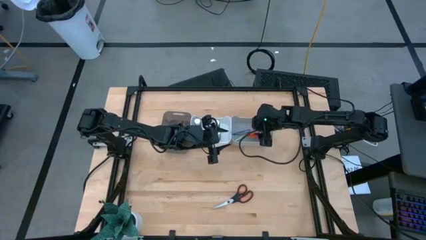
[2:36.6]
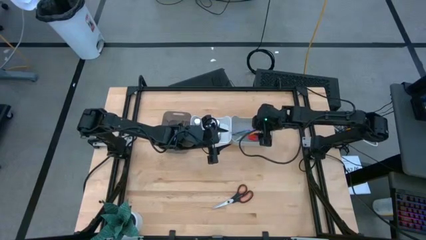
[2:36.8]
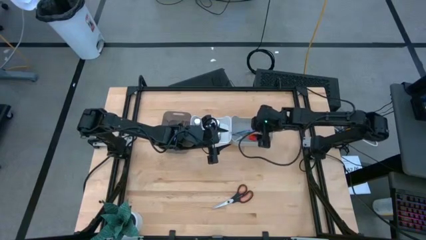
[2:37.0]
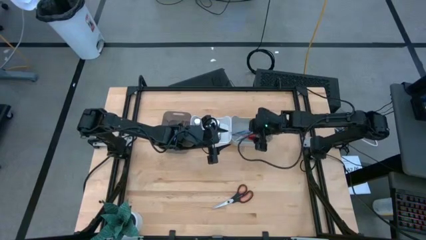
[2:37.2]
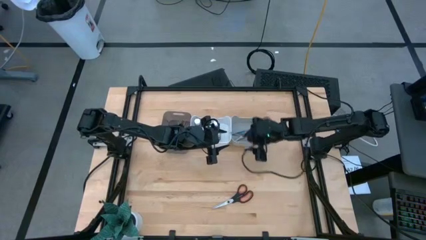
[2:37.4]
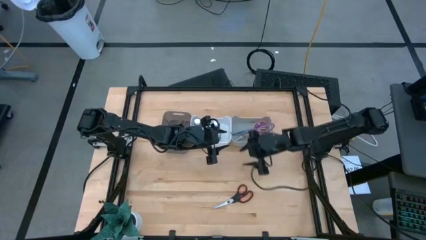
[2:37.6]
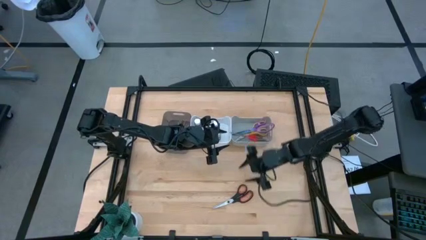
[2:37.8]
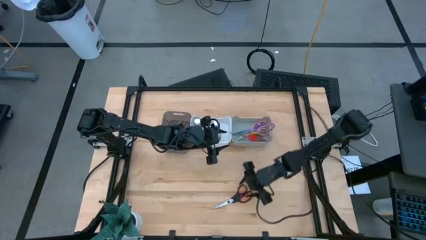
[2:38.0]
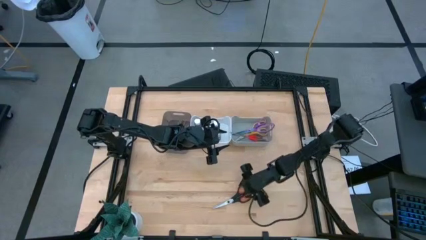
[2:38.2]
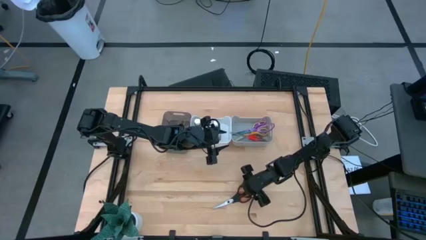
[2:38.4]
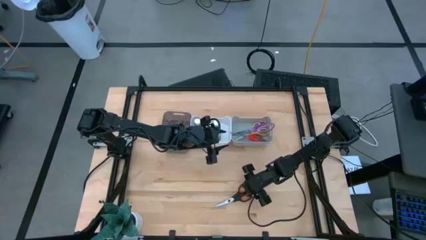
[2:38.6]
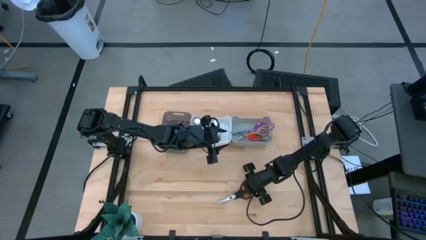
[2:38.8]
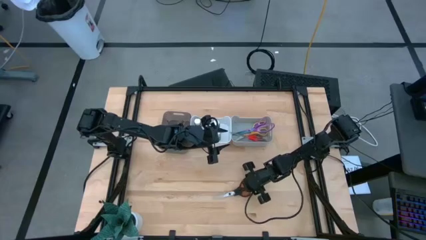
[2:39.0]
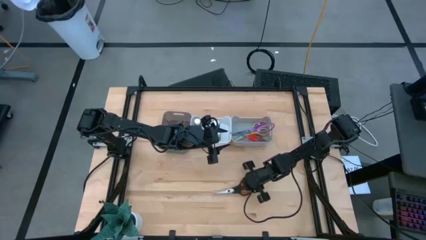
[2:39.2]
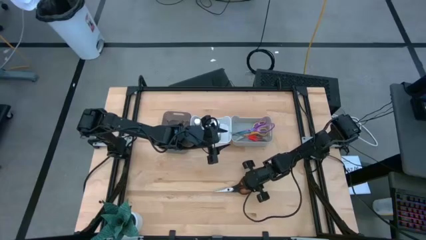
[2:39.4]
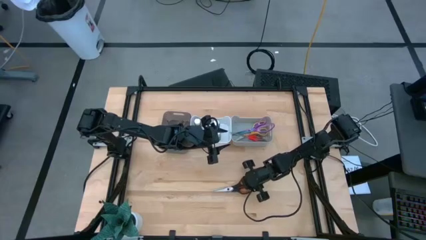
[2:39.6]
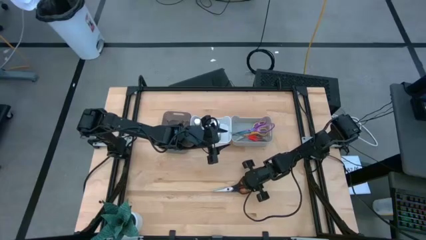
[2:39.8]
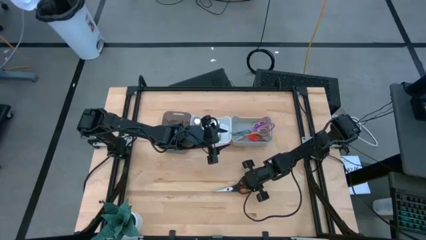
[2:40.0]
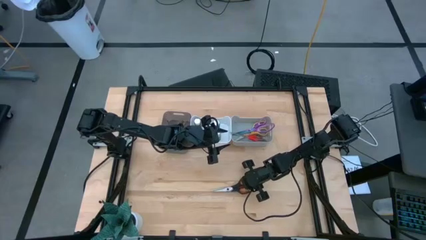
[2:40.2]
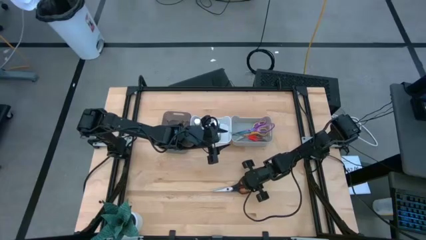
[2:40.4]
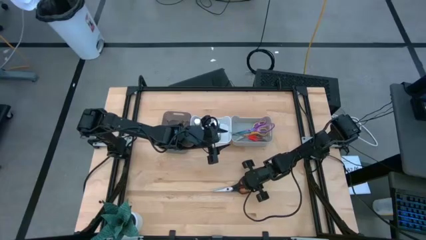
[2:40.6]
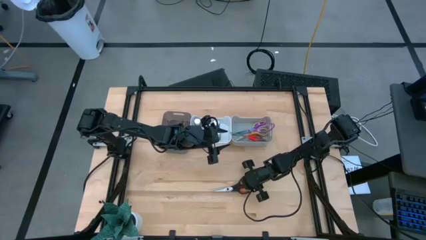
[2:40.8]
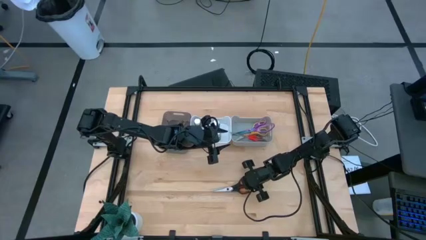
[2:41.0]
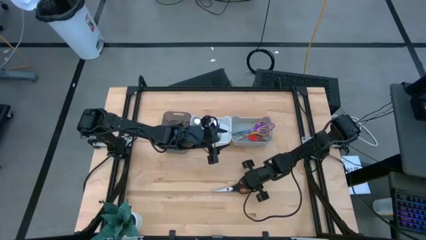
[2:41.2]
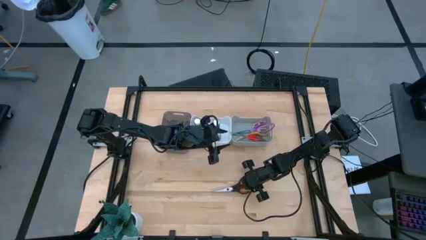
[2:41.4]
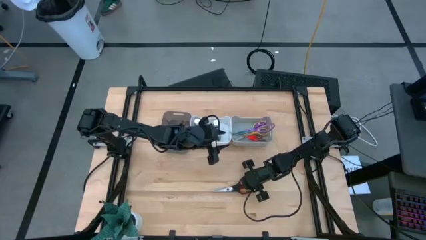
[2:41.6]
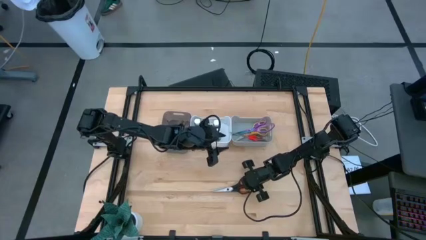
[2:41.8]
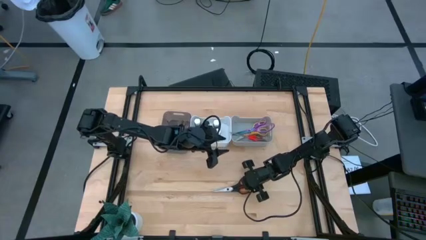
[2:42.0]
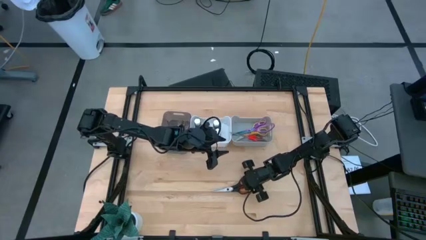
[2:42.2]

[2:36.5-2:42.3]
Task: Pick & Place Paint Supplies
Put the black scissors into the gray bin

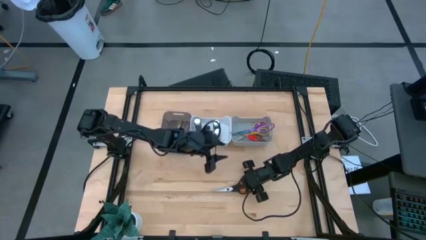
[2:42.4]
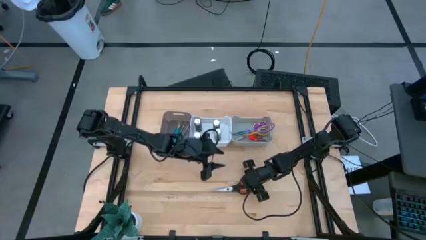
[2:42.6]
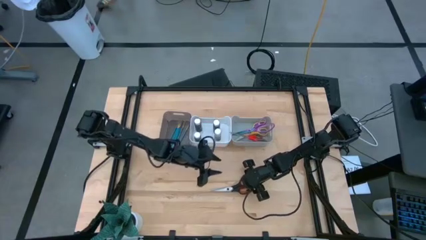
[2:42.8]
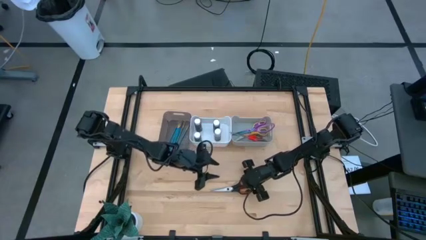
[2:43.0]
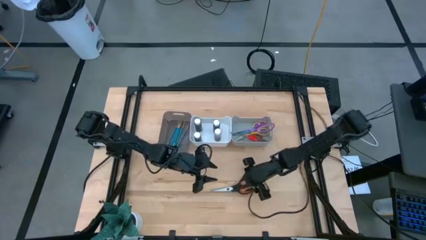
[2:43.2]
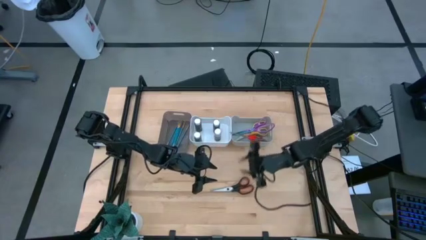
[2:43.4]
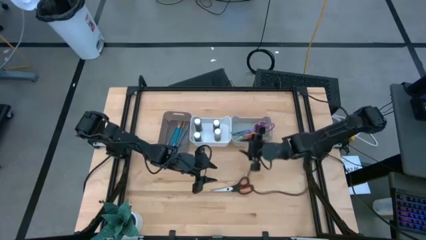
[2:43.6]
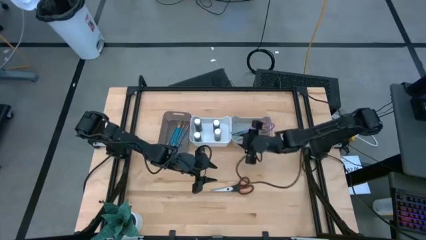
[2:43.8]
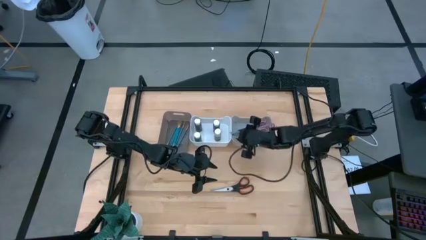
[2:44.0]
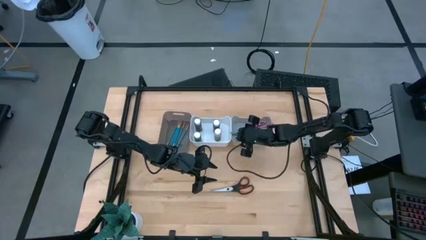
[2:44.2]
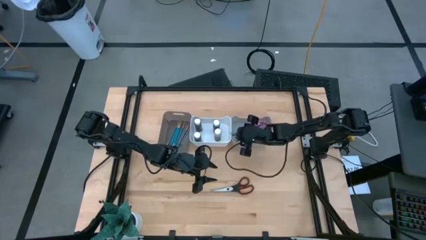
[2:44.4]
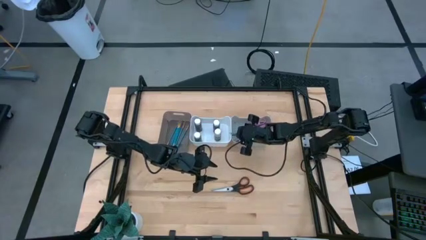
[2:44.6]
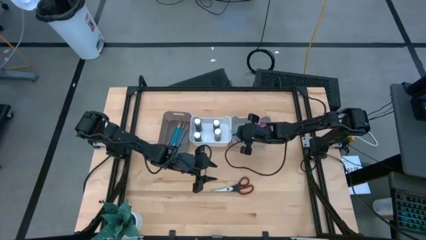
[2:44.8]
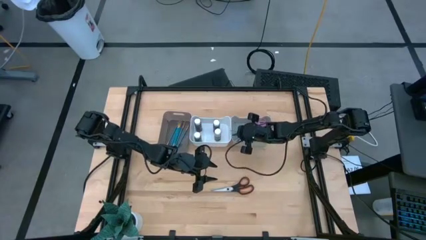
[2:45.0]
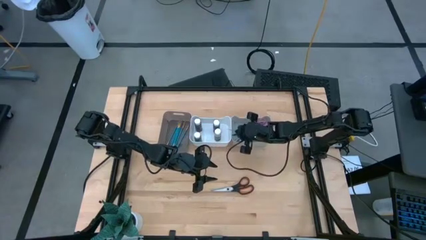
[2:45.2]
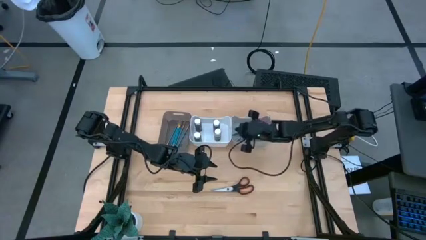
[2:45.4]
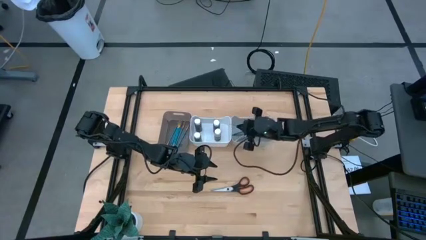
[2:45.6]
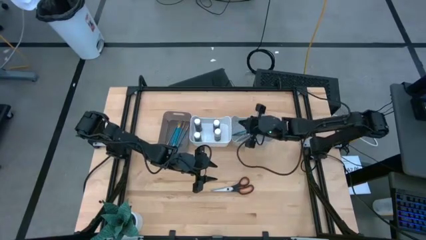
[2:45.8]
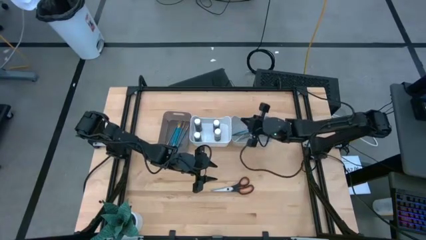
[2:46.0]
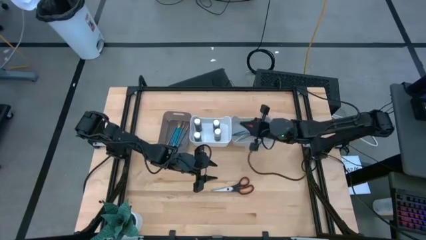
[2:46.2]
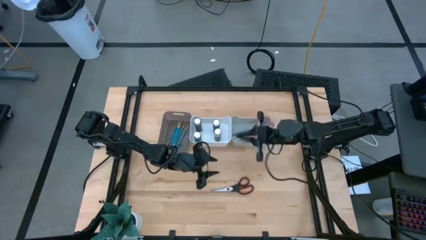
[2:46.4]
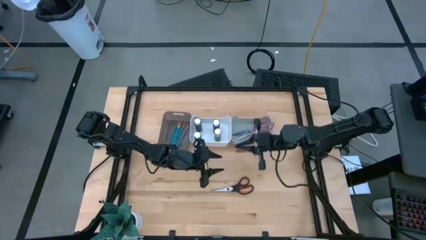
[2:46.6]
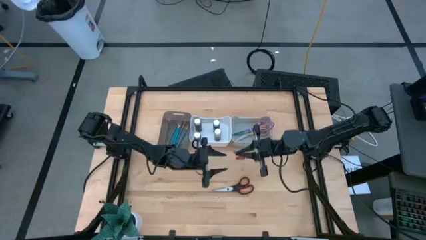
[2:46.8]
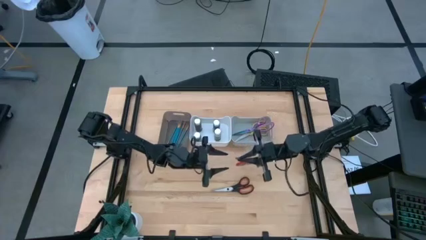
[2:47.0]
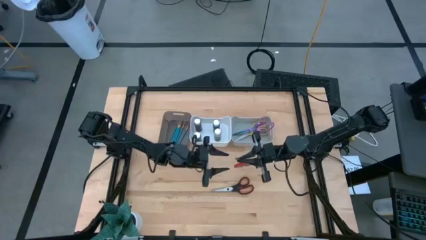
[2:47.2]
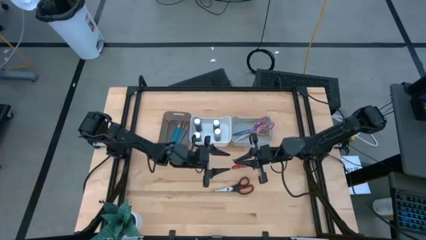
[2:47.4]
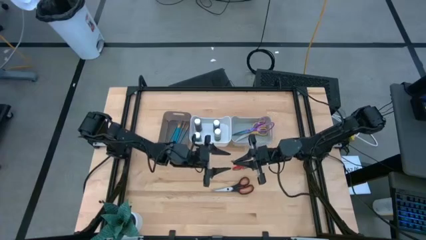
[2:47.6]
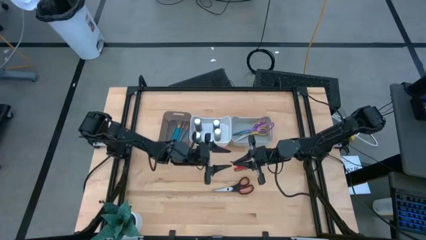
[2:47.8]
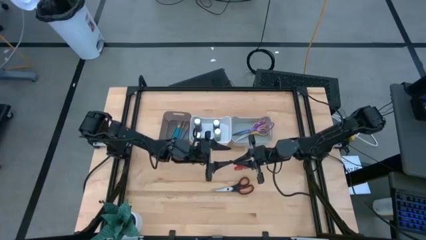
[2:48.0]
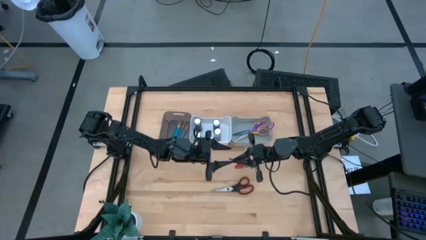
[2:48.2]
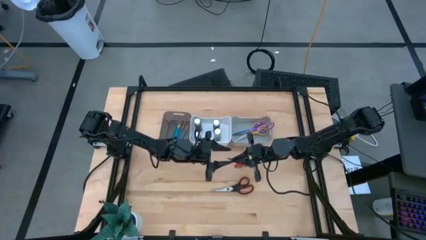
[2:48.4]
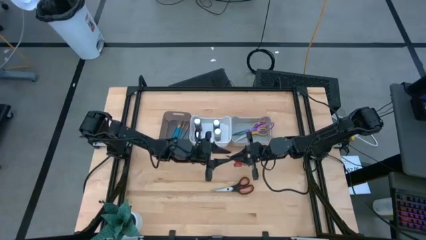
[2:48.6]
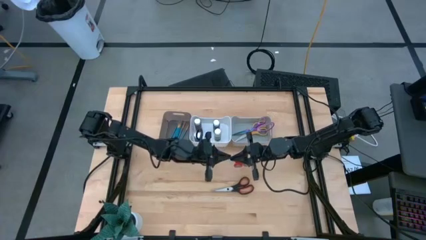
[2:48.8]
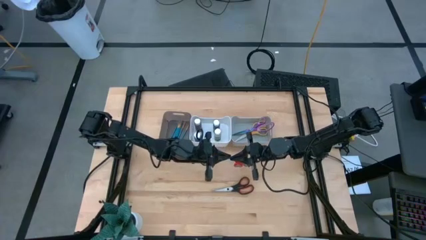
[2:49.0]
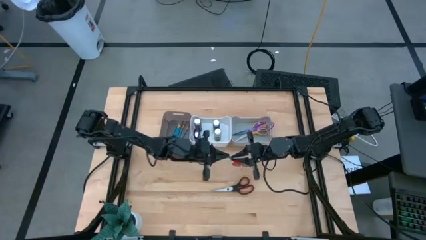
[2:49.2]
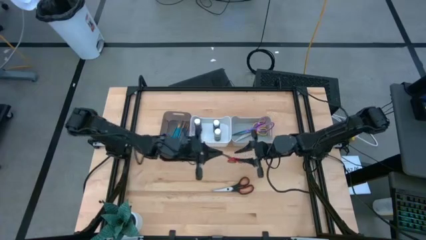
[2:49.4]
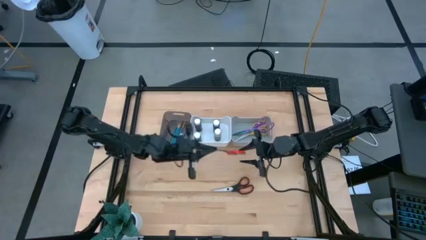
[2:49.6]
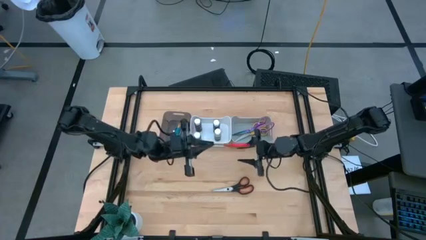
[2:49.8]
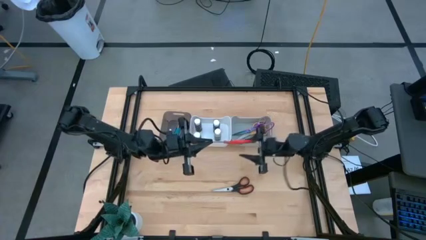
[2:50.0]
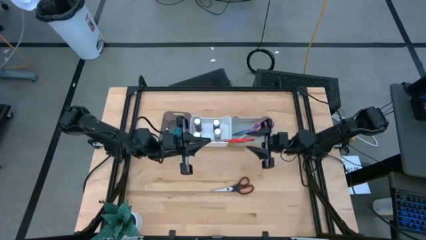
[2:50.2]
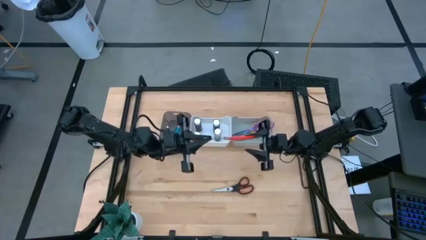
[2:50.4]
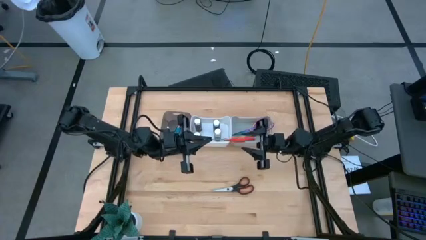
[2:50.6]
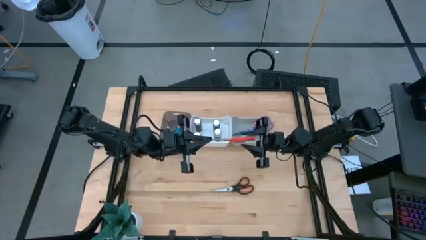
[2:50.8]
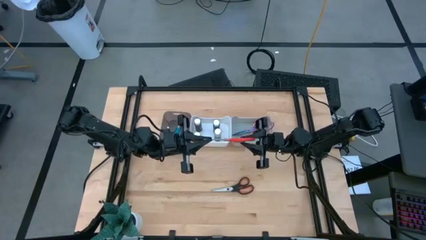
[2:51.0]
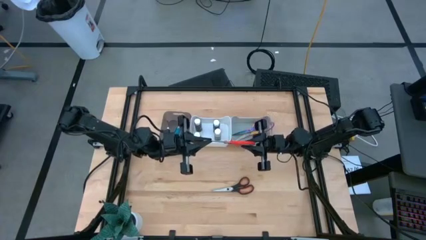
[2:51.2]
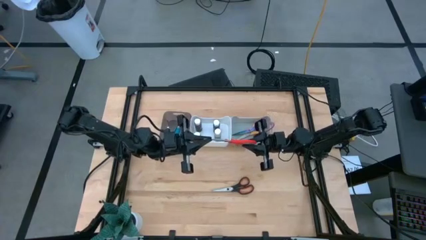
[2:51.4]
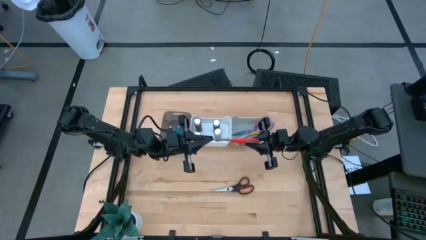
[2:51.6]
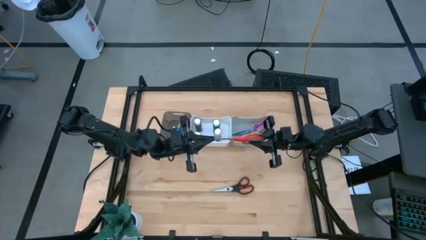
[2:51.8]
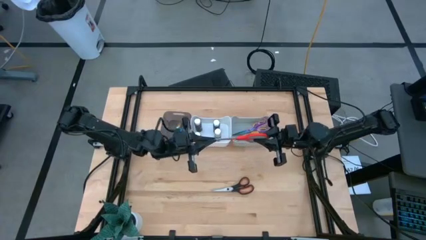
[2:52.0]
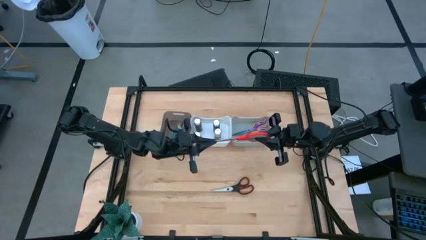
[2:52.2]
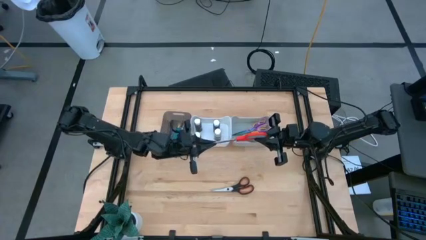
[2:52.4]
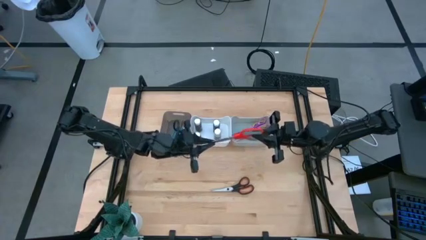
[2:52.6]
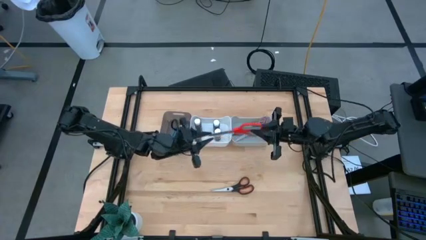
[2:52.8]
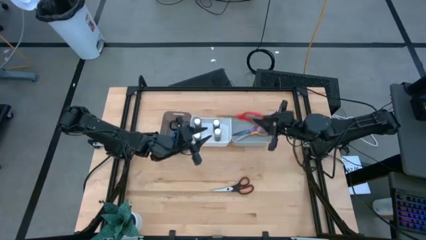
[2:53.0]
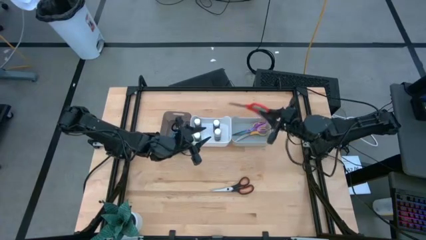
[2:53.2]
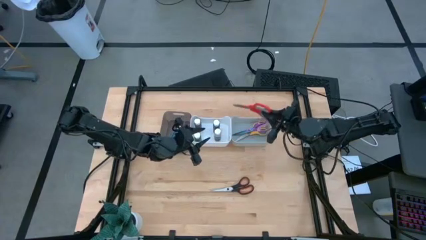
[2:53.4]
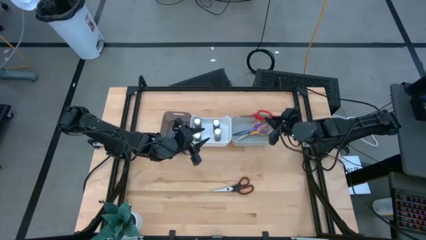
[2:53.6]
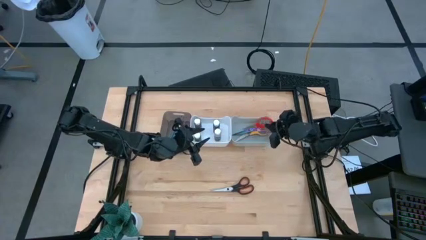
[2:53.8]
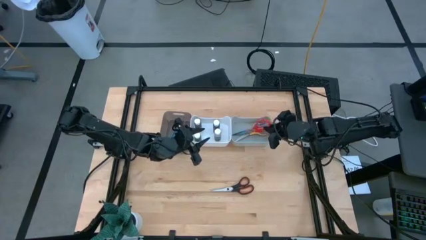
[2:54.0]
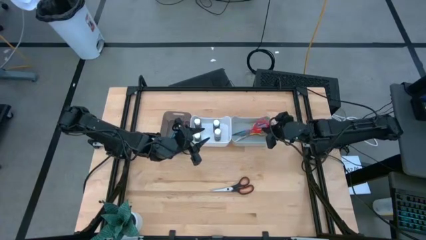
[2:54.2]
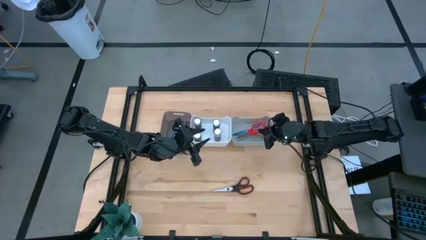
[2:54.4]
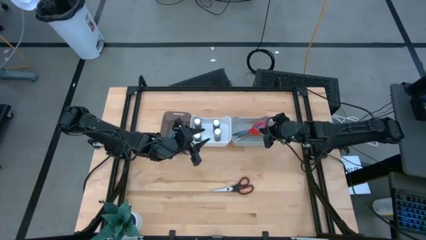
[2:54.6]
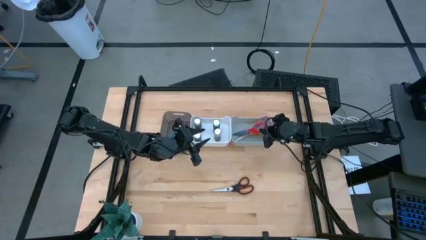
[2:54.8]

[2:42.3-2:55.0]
Adjust the red scissors in the gray bin
